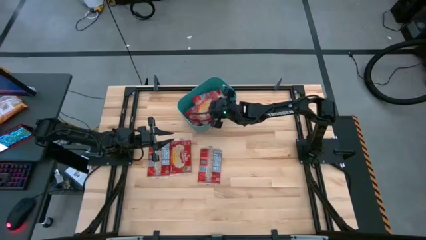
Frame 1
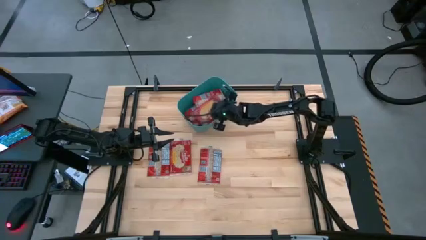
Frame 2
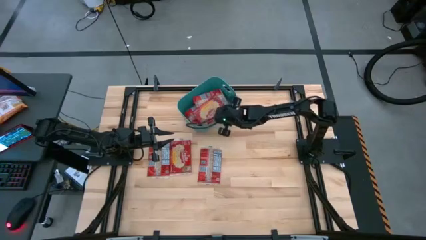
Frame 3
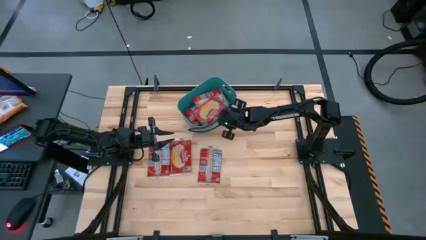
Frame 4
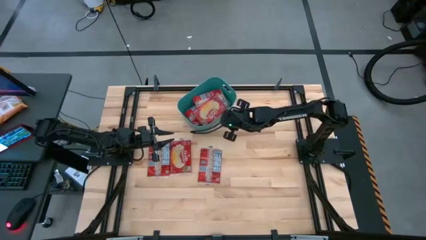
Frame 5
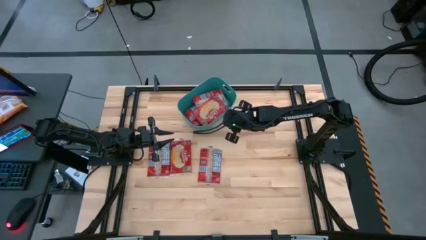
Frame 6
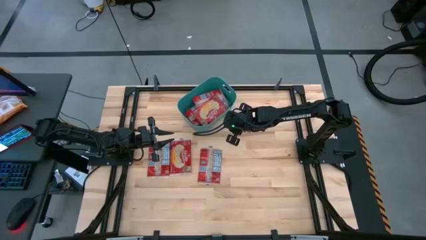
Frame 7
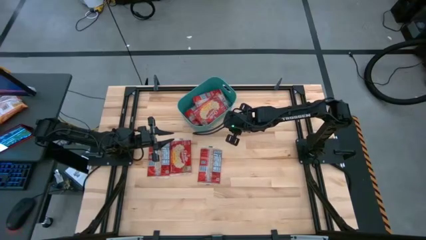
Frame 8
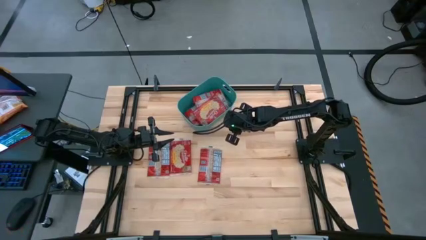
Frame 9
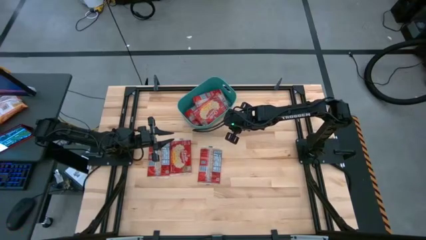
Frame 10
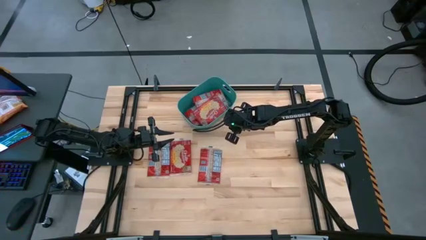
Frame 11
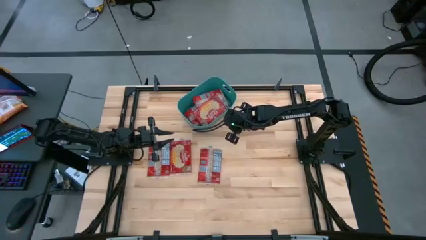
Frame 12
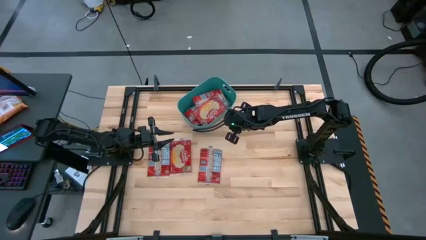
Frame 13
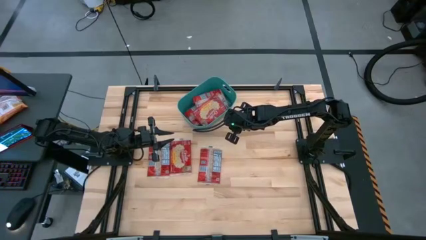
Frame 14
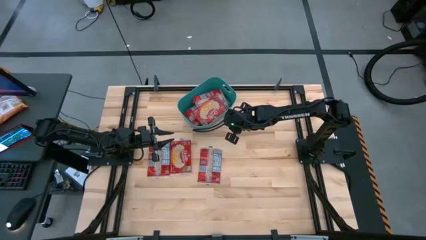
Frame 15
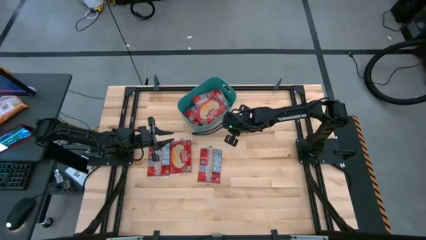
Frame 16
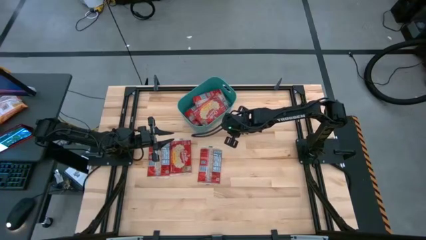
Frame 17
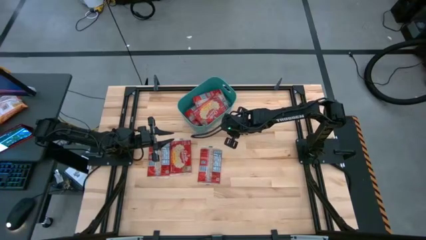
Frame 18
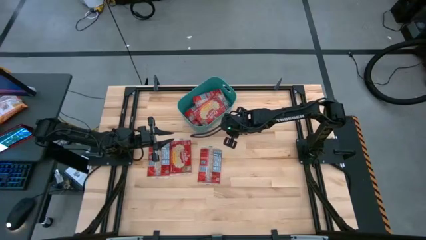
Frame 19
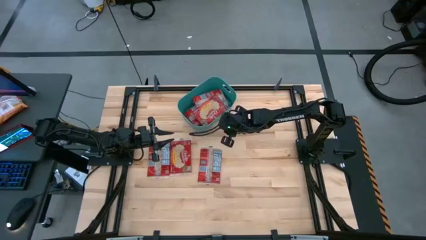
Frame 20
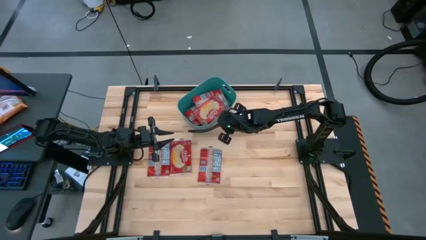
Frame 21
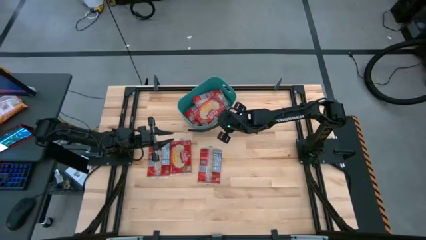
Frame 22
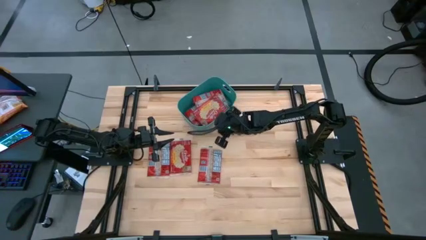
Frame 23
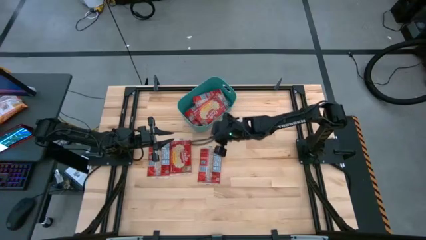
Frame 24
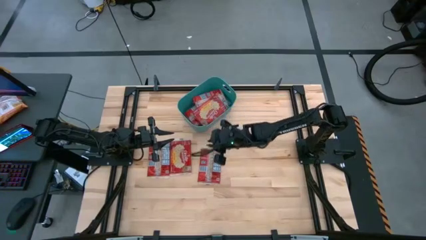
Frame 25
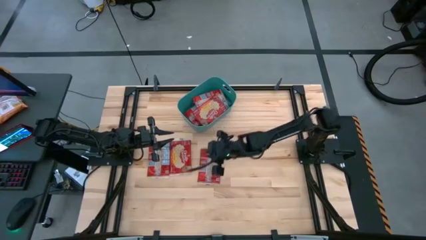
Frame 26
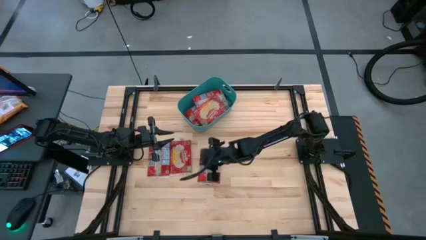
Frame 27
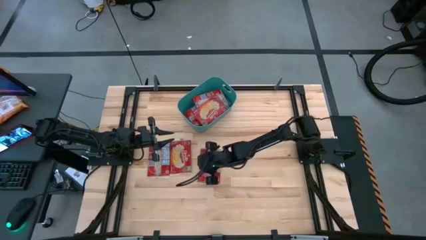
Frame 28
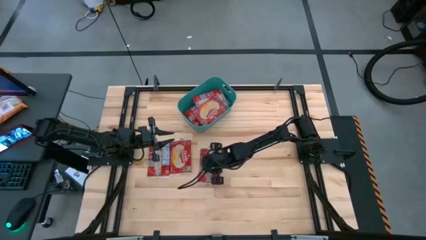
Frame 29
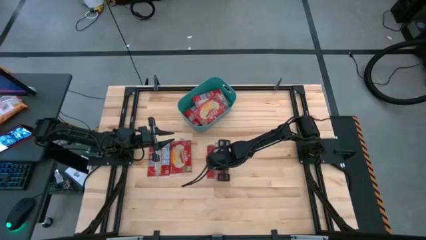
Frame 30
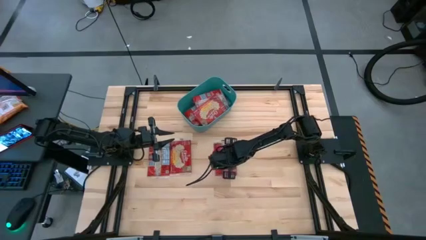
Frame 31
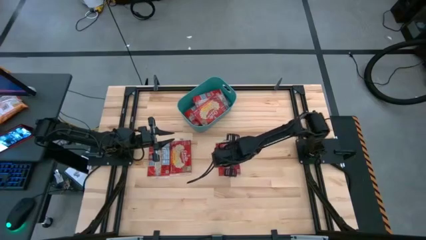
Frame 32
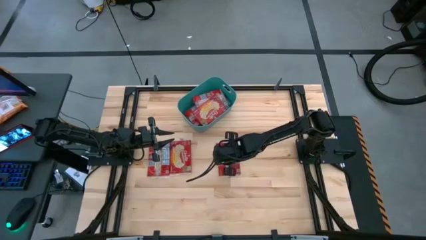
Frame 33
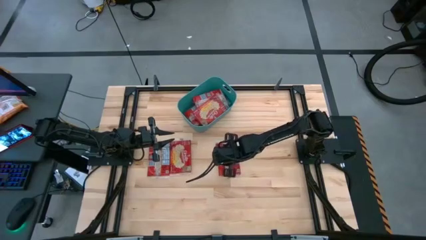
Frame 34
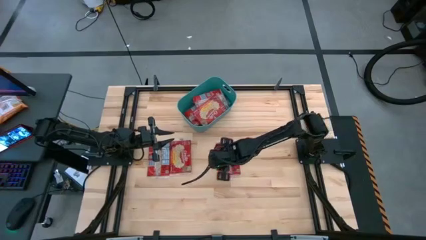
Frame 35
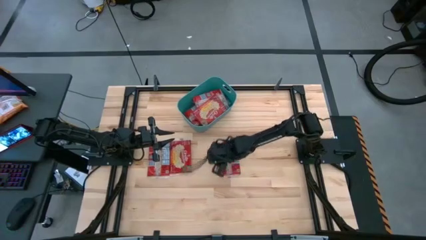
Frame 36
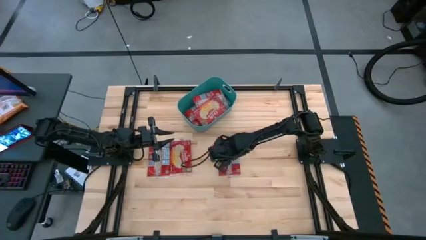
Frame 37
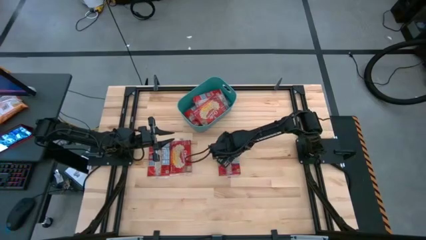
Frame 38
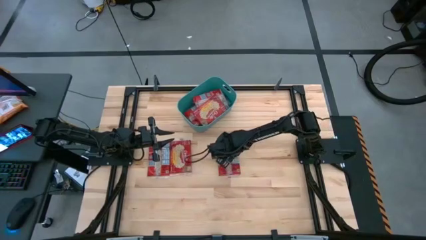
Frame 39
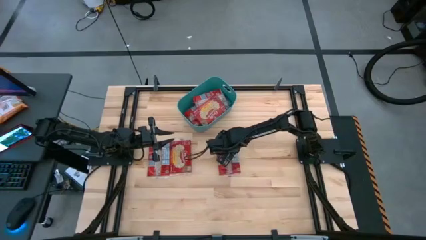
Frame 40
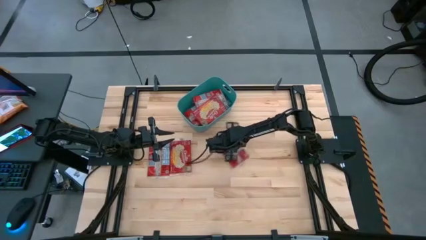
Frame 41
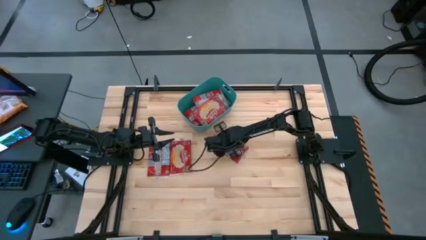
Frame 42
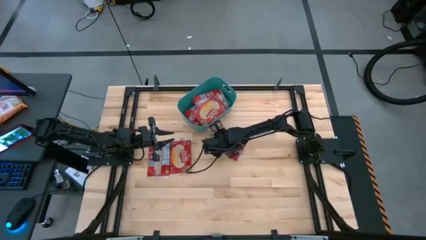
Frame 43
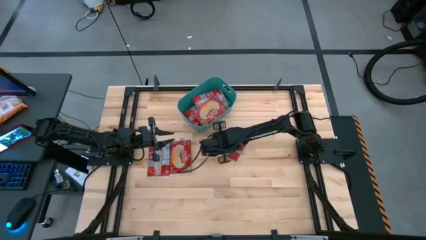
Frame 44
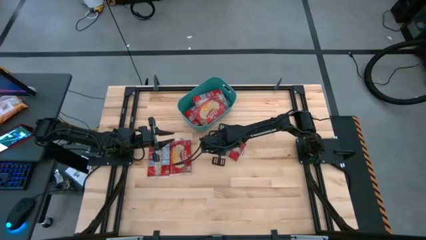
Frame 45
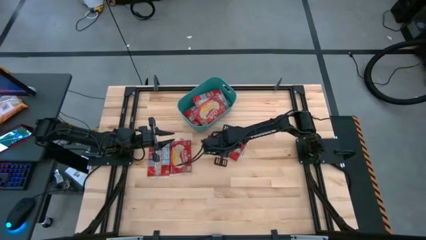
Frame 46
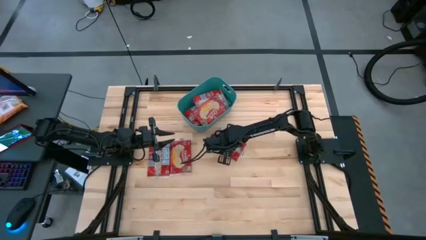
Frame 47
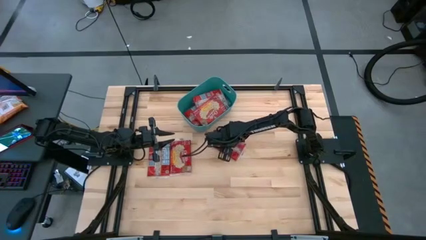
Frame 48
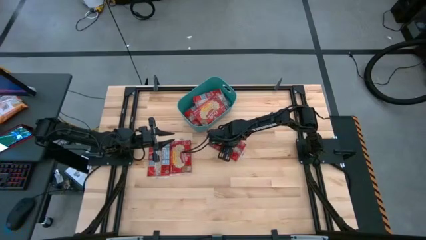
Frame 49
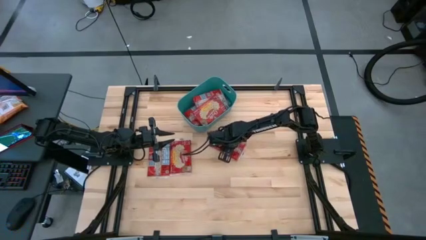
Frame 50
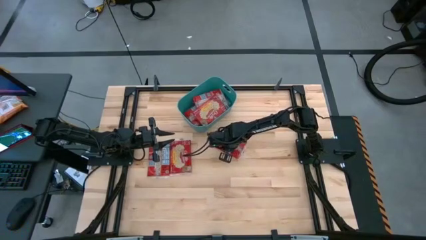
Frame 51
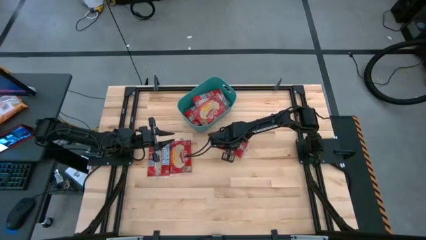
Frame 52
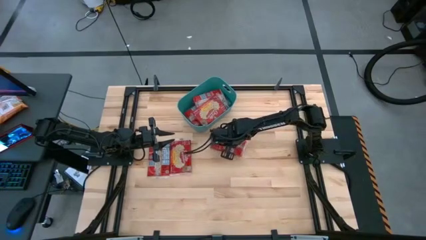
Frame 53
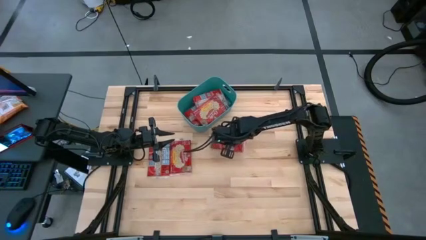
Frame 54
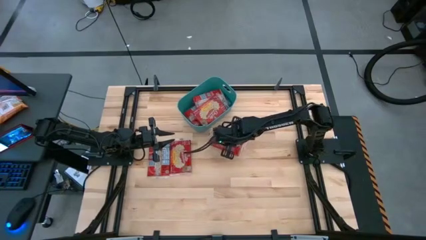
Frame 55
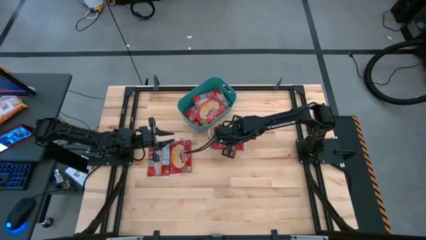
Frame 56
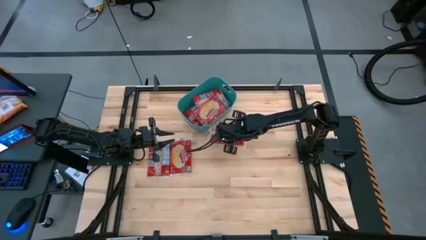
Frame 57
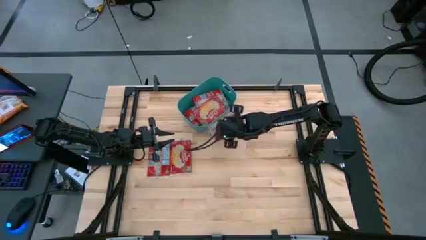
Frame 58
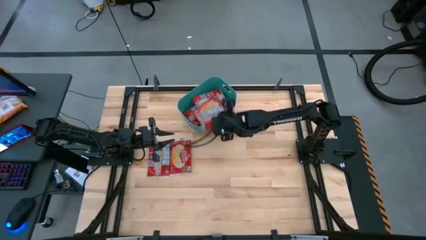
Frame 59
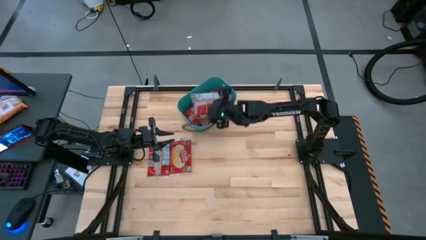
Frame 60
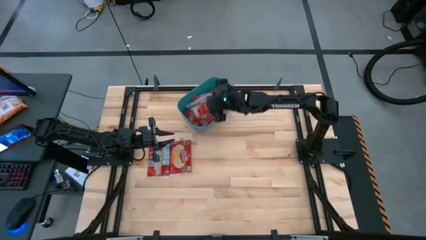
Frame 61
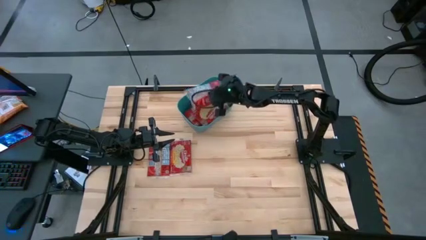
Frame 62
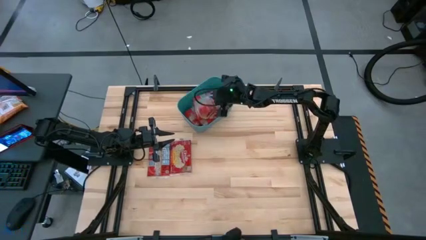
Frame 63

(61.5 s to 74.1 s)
Task: Sort popcorn bags into baskets
Put the popcorn bag into the blue bin
